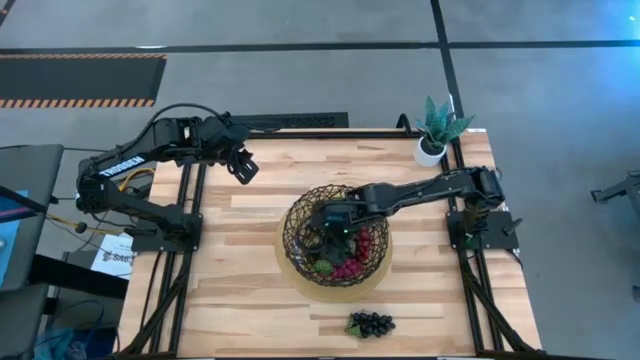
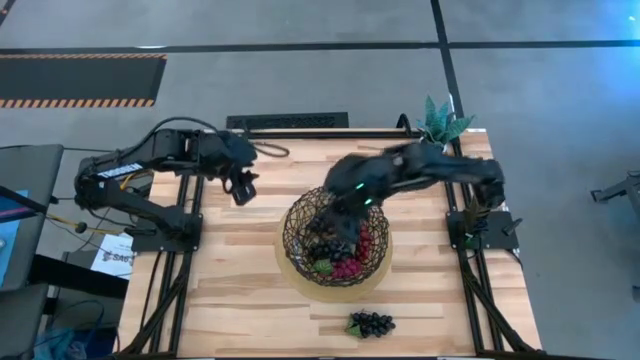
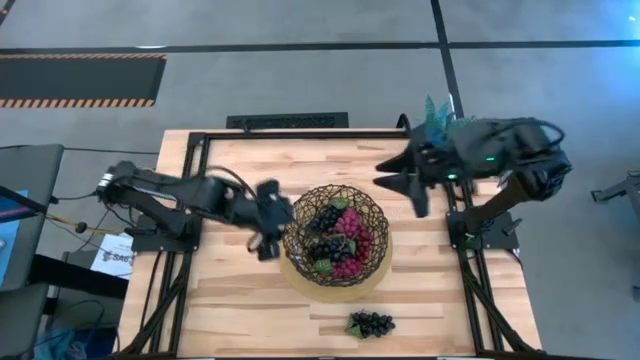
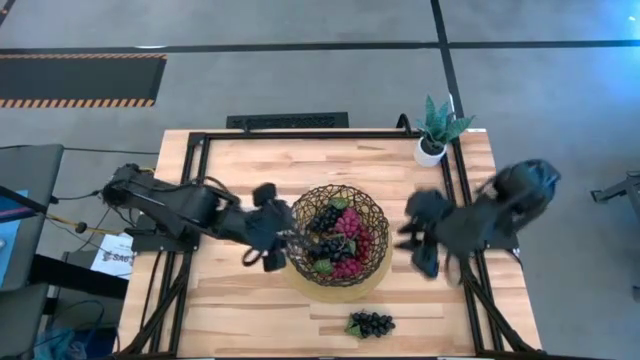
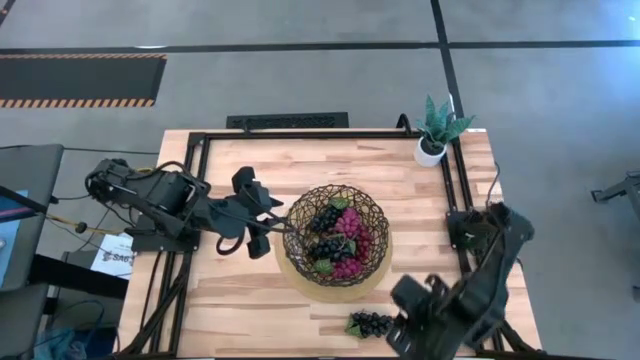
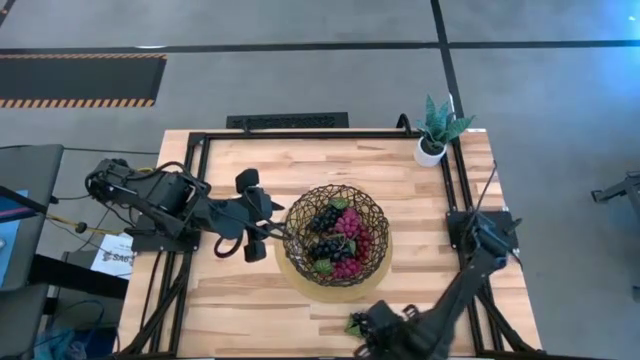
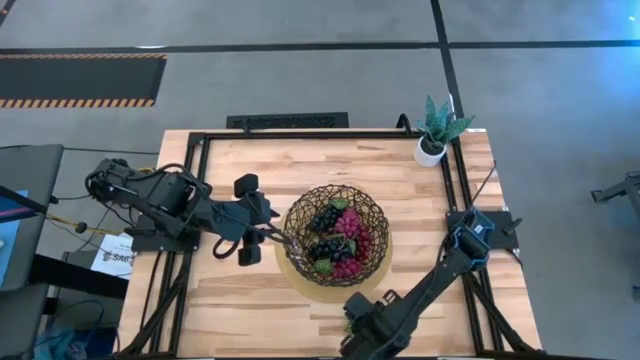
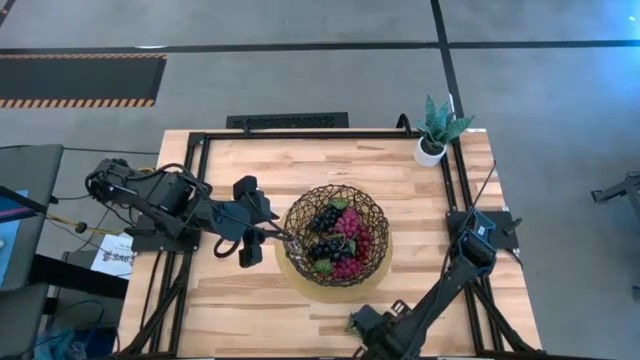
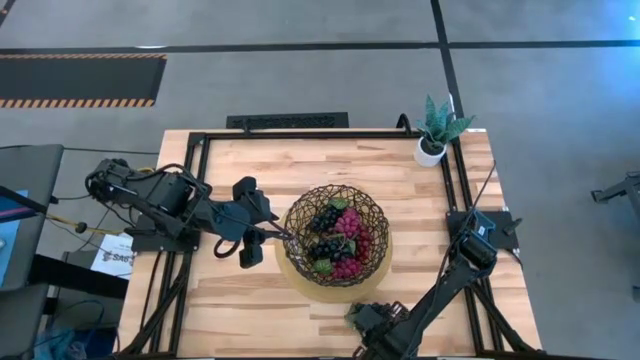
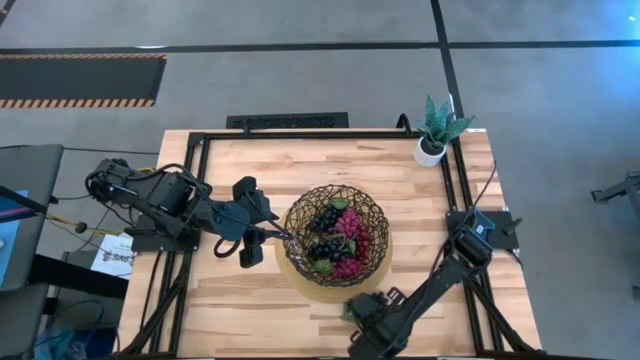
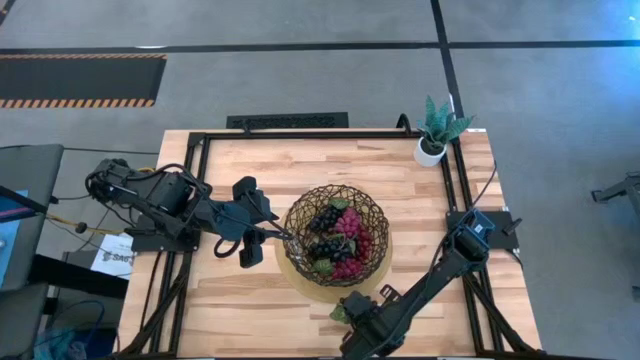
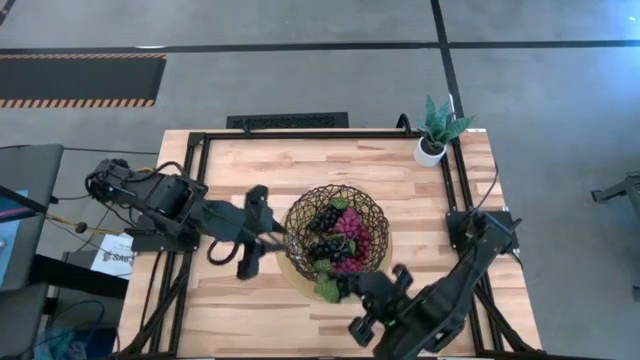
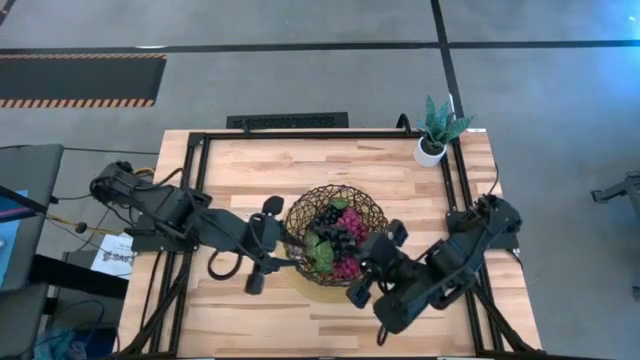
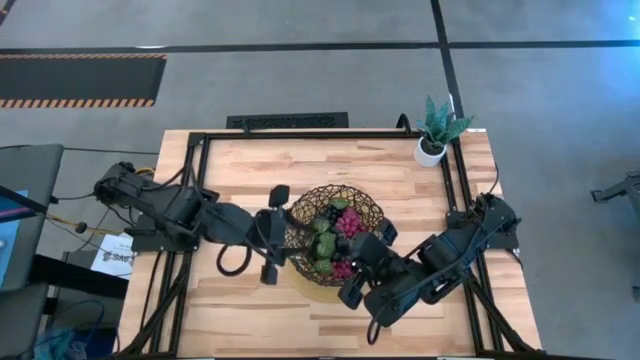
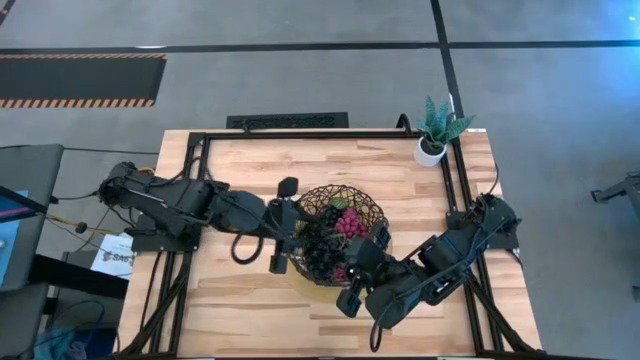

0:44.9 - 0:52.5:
Task: Build produce basket
Put the black grapes into the black wire basket

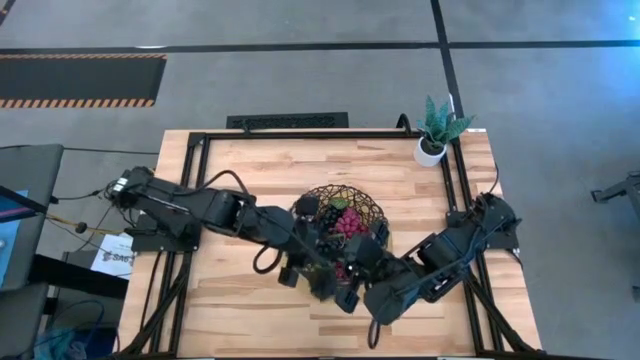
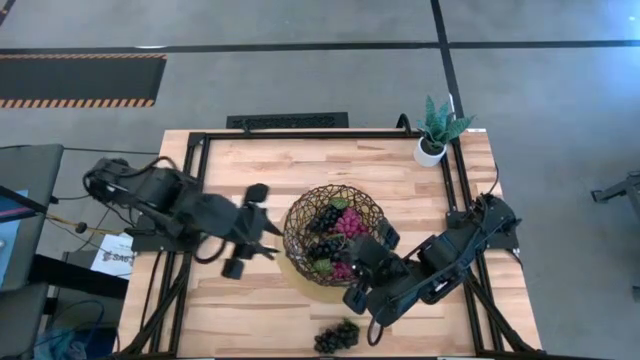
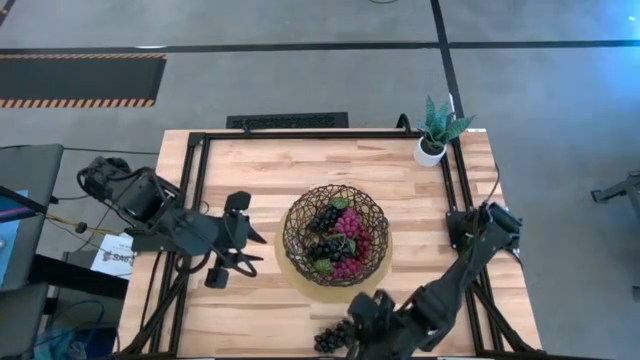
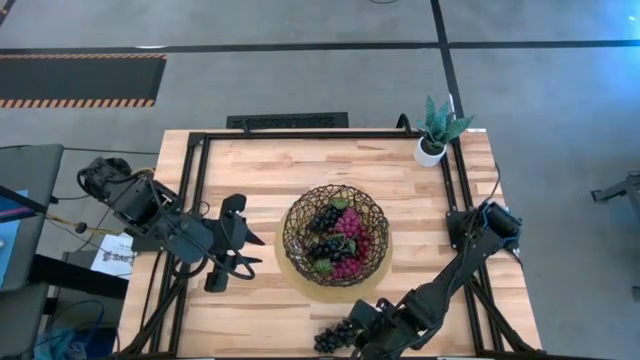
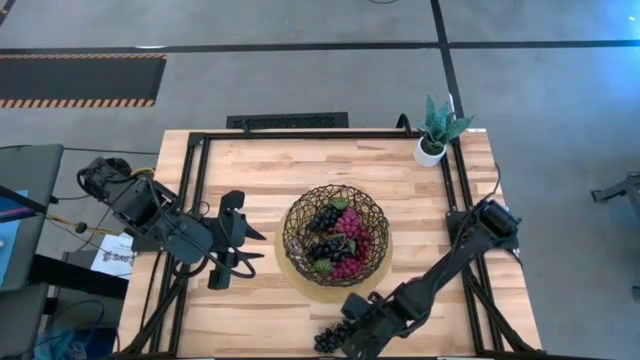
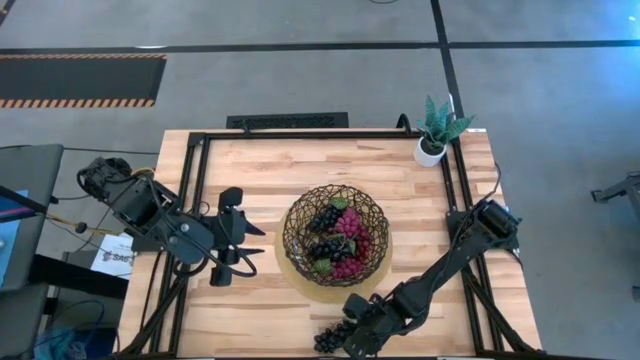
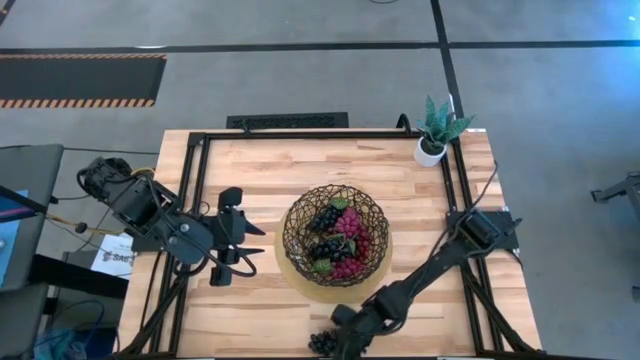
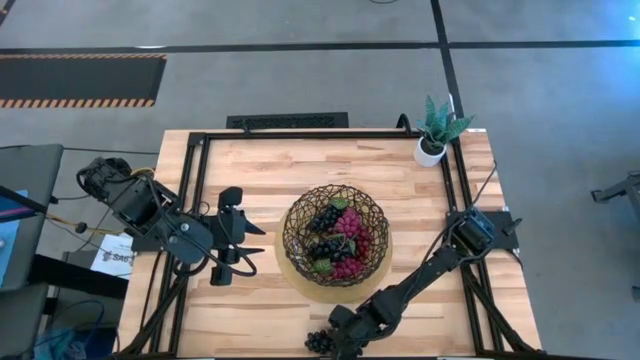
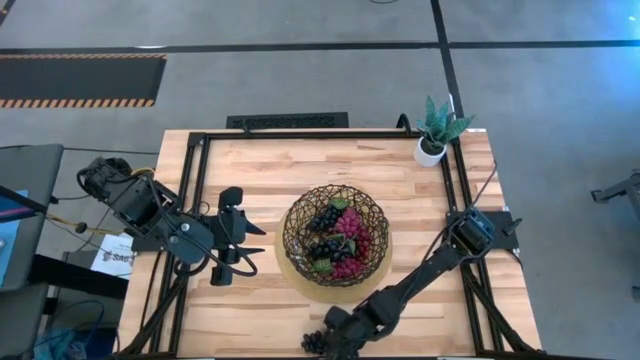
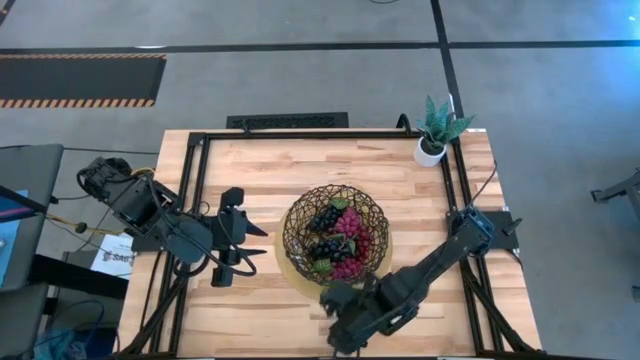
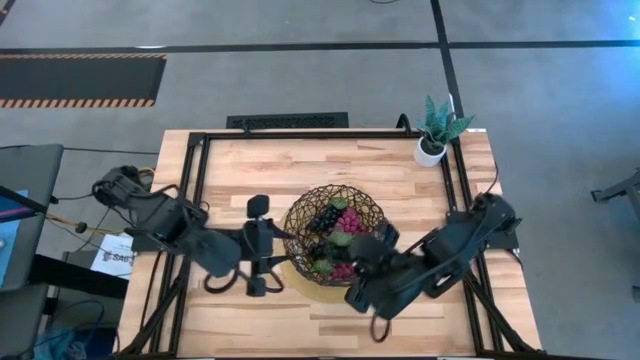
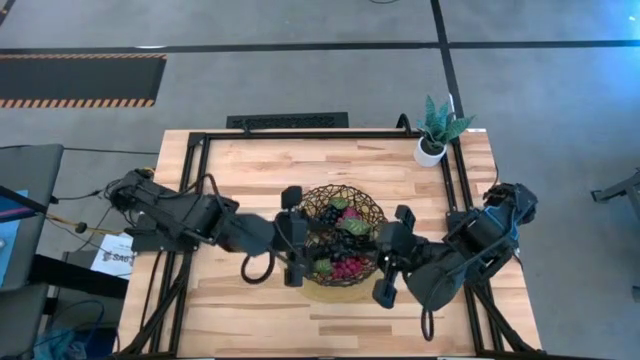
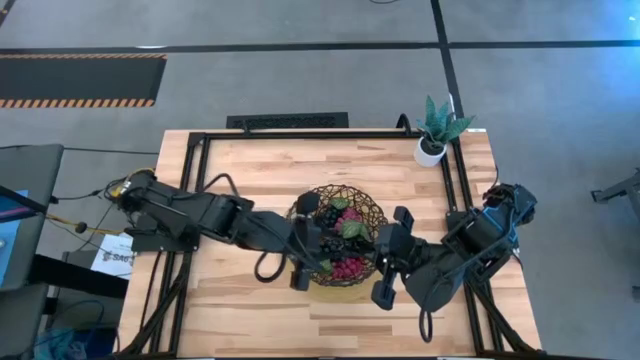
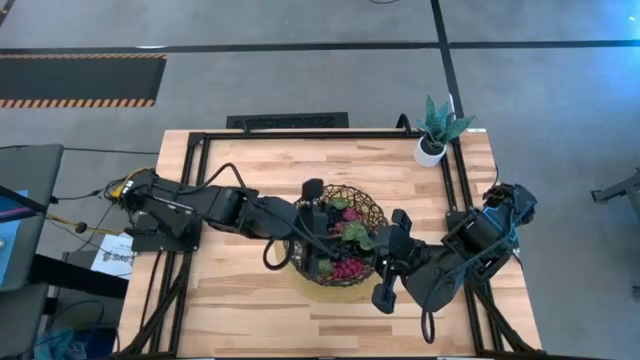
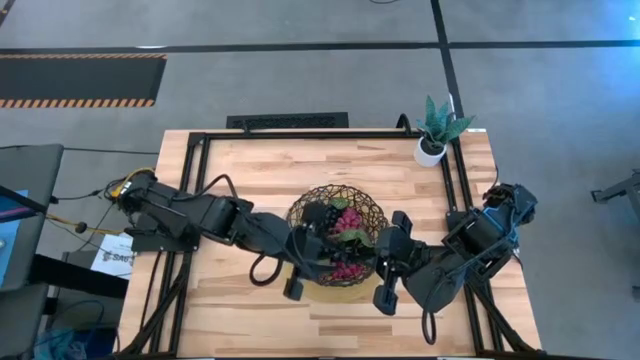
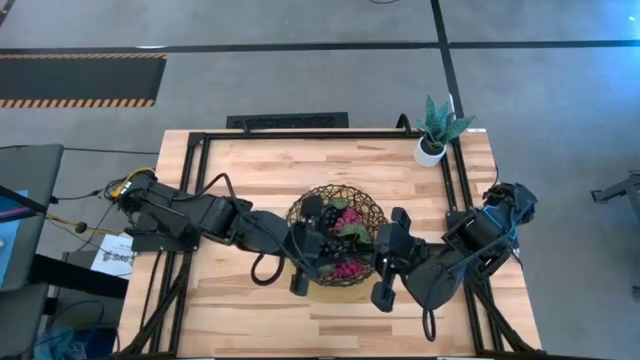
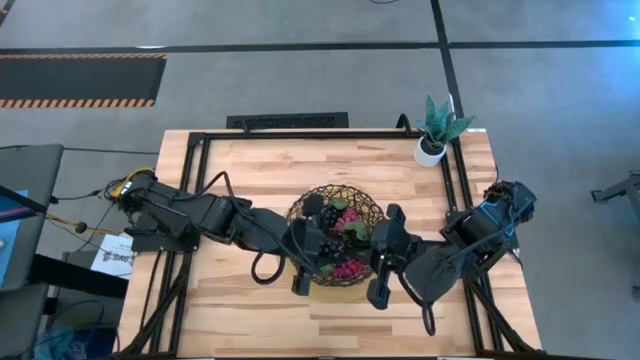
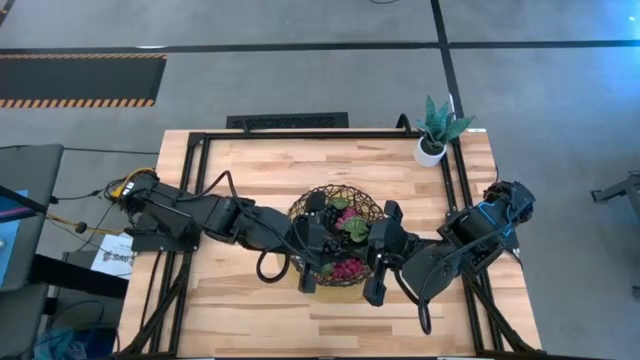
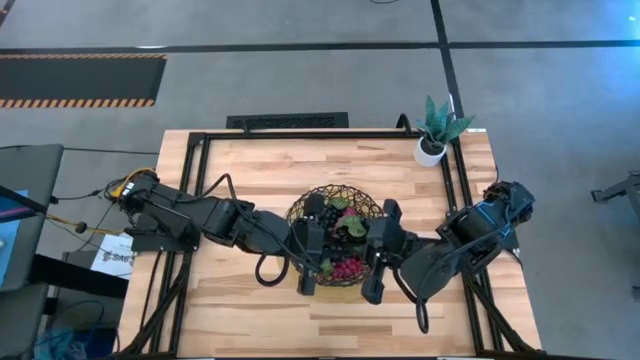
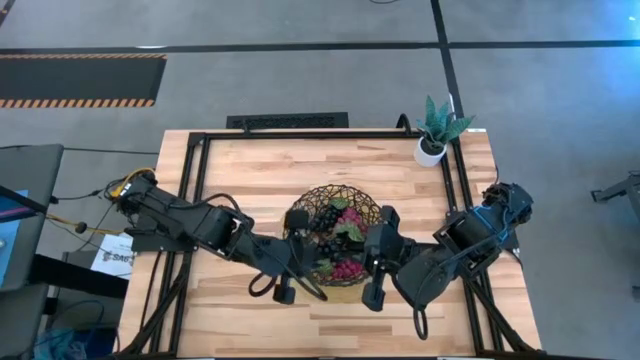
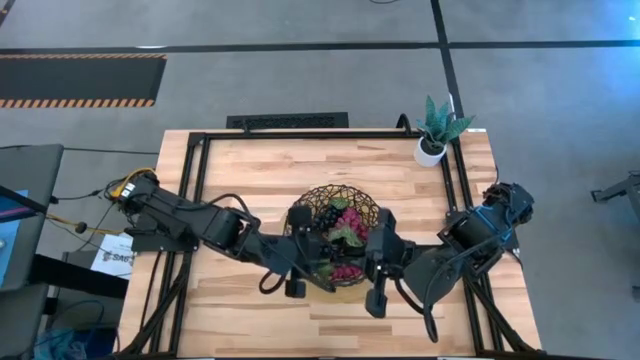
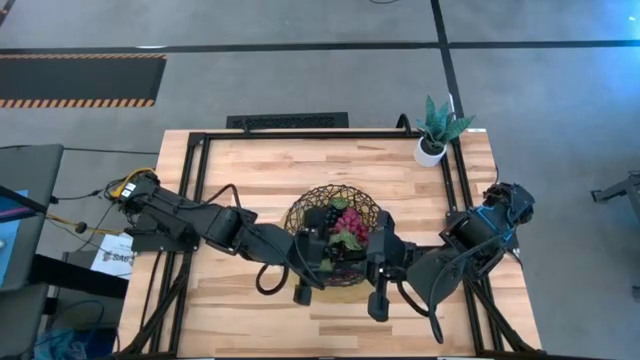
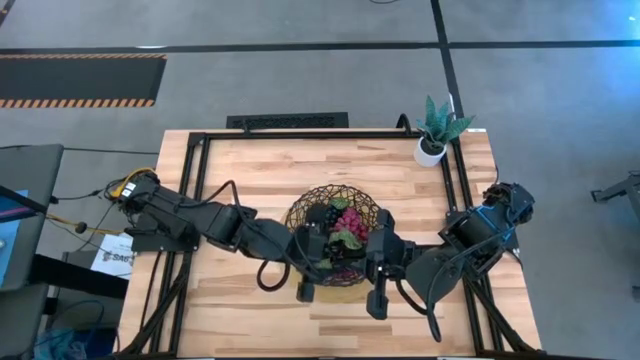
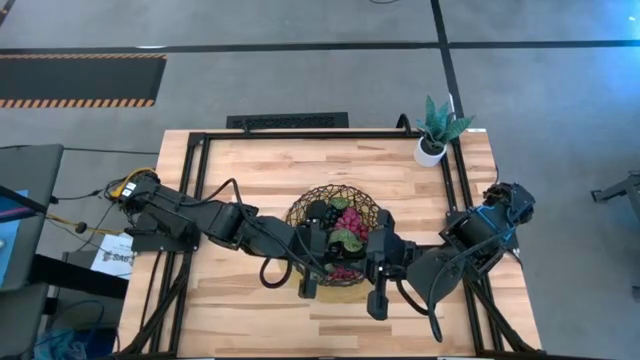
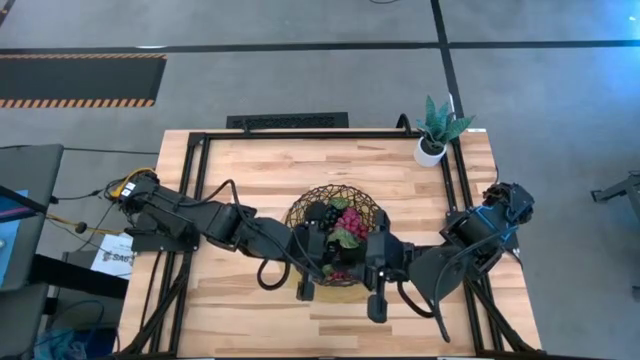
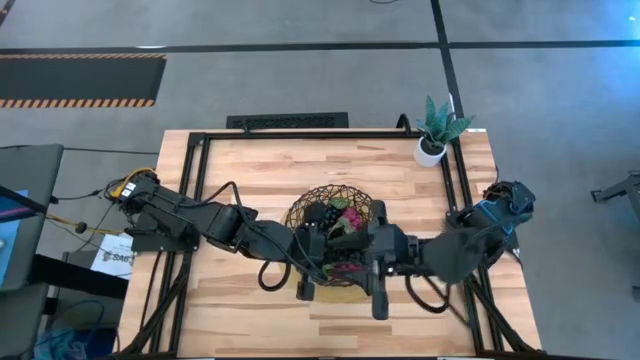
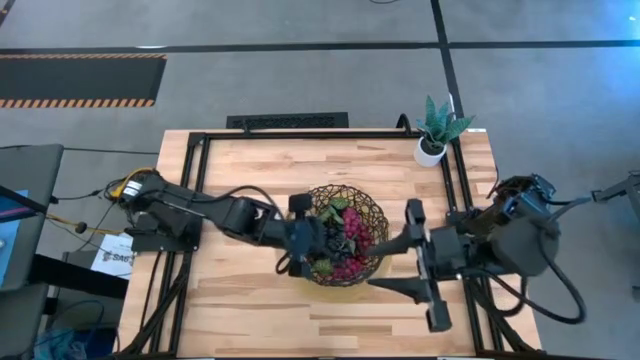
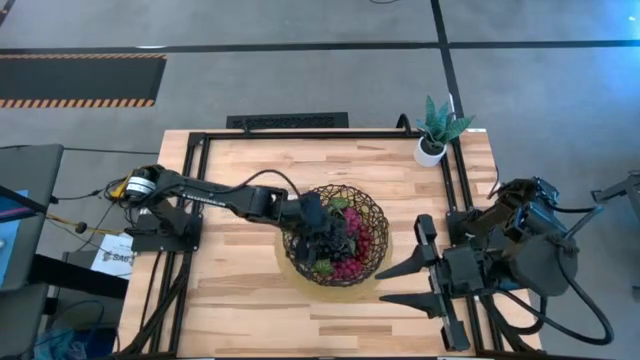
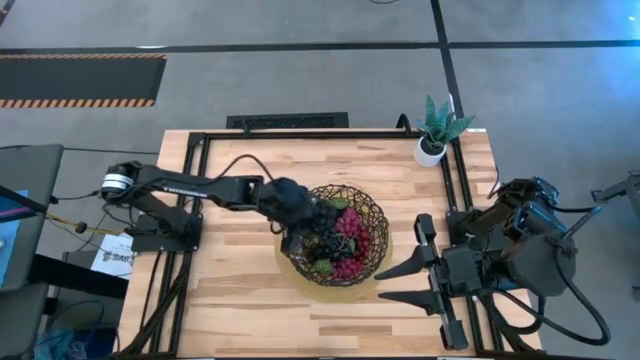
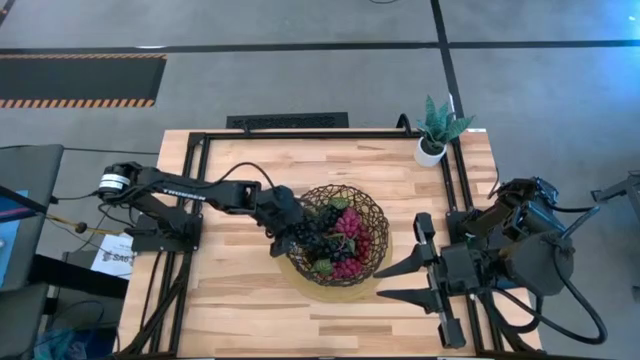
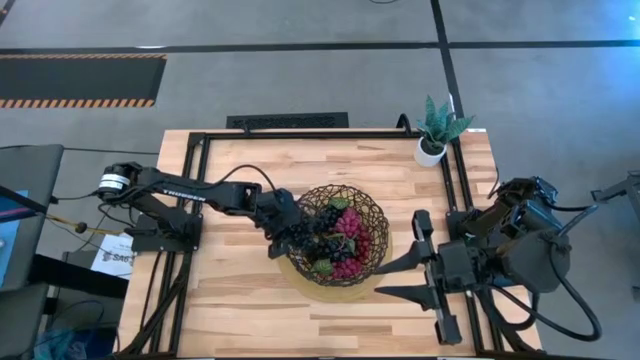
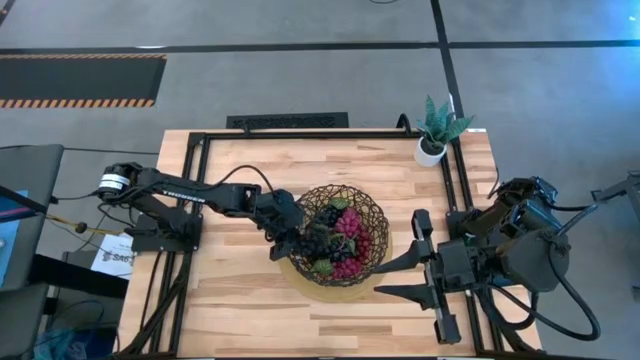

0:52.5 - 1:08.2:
Put the black grapes into the black wire basket
